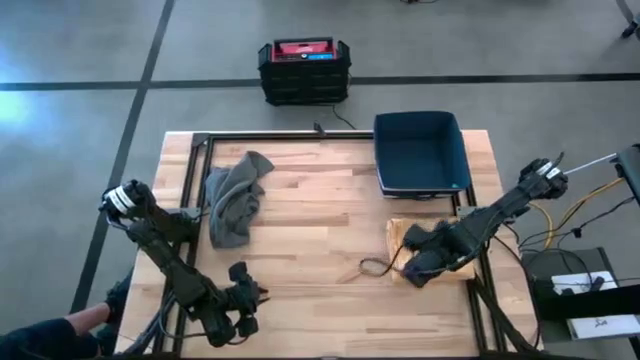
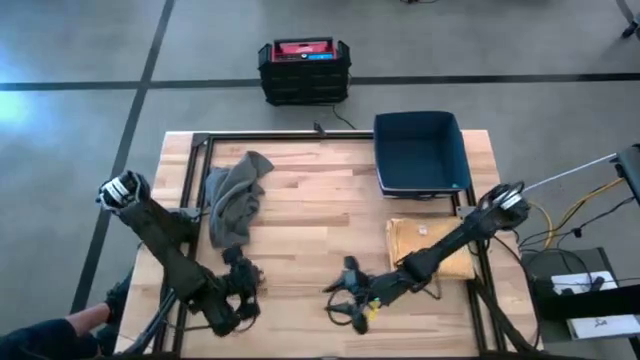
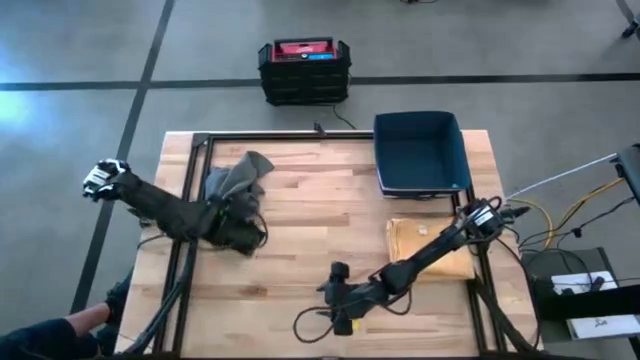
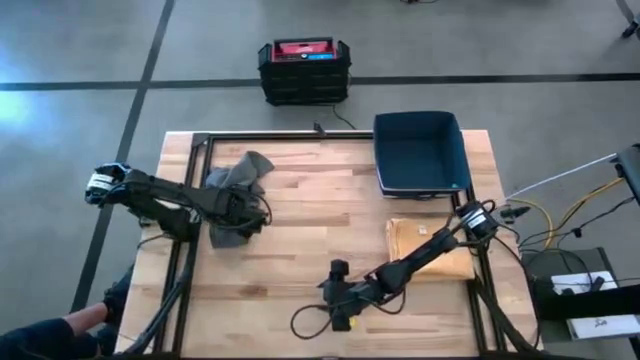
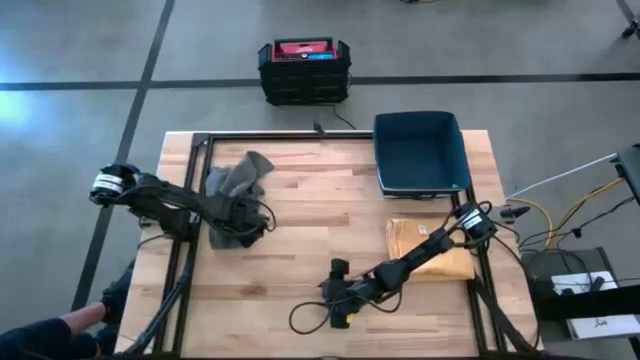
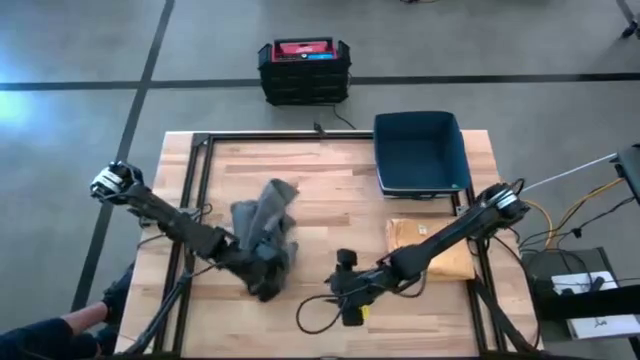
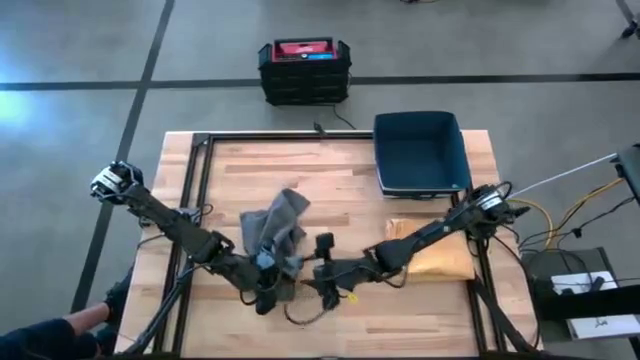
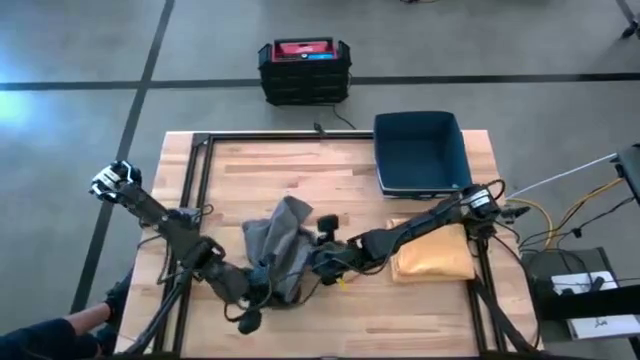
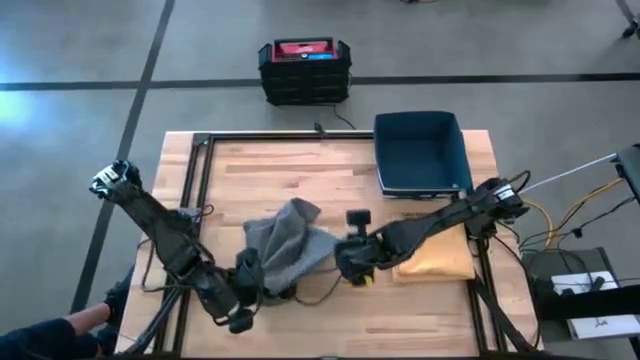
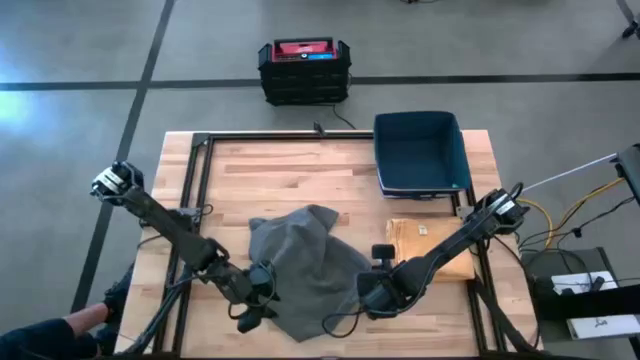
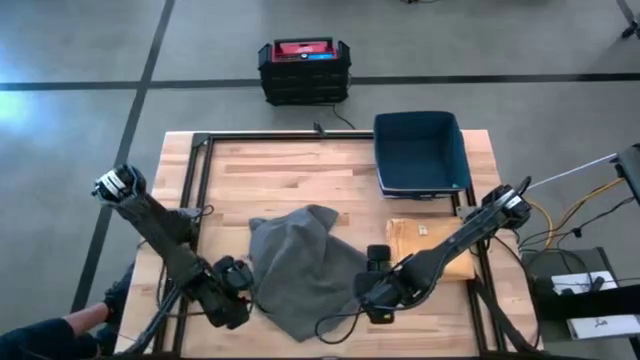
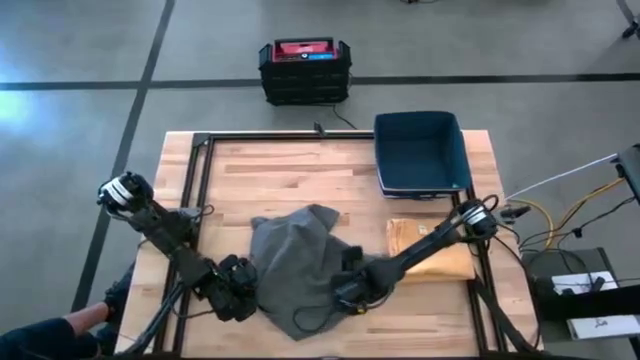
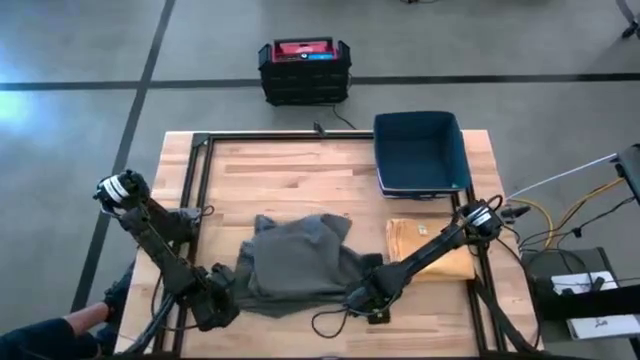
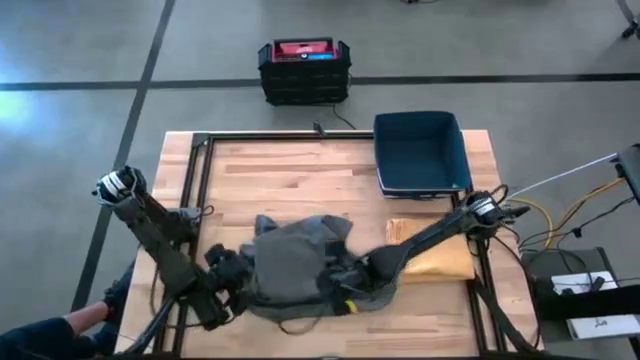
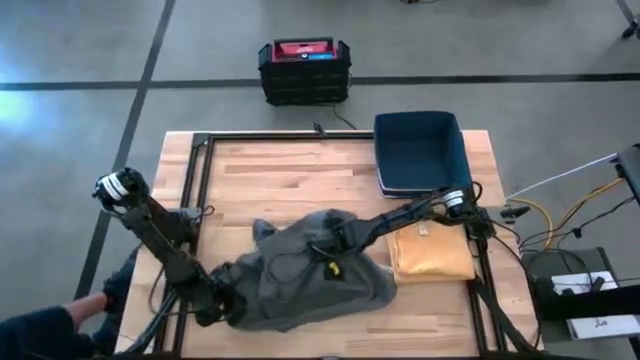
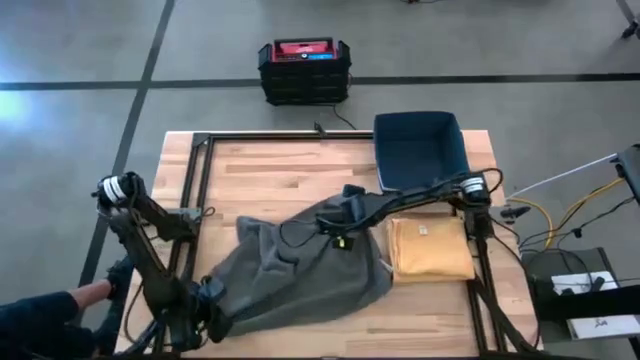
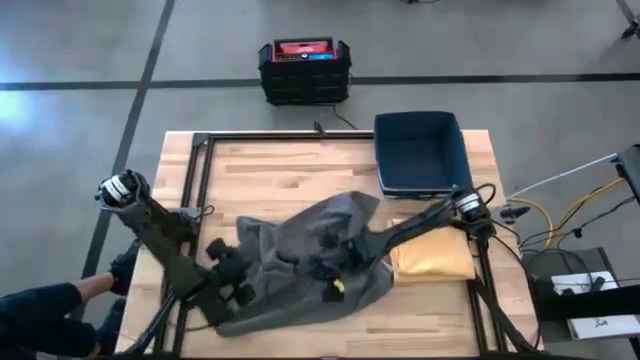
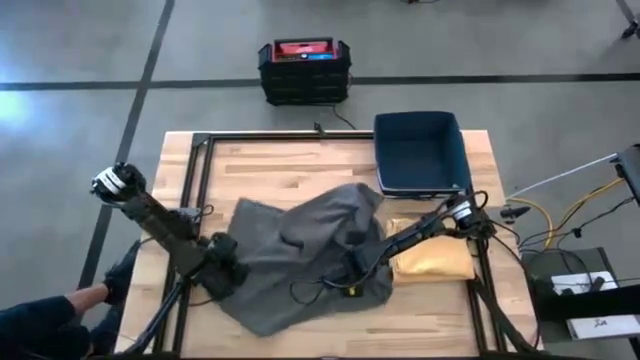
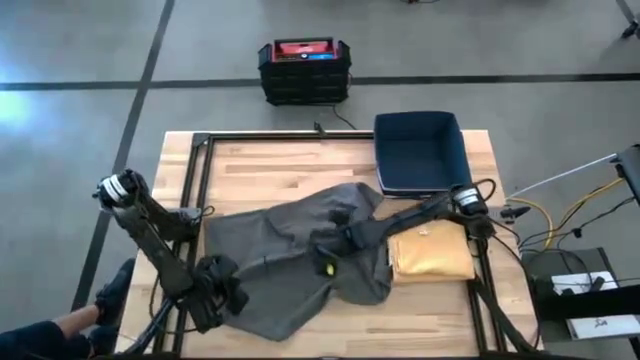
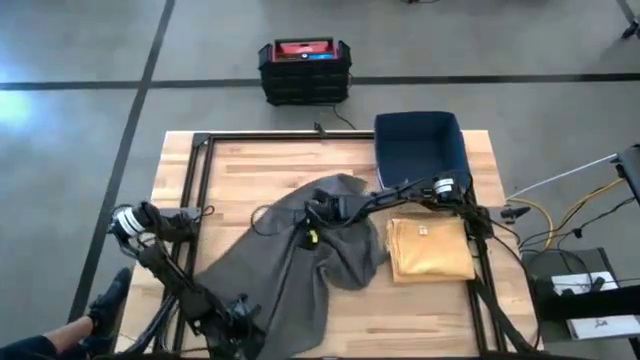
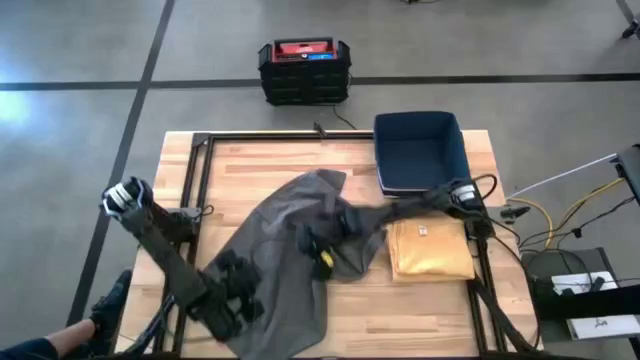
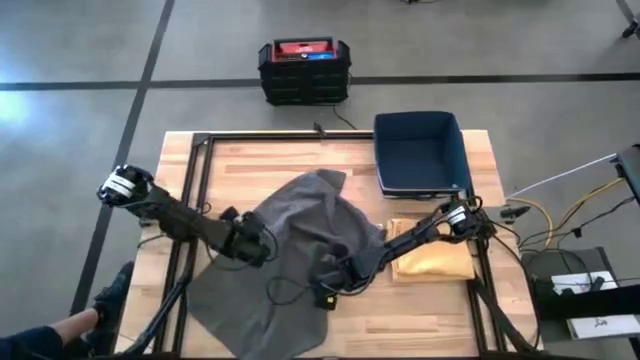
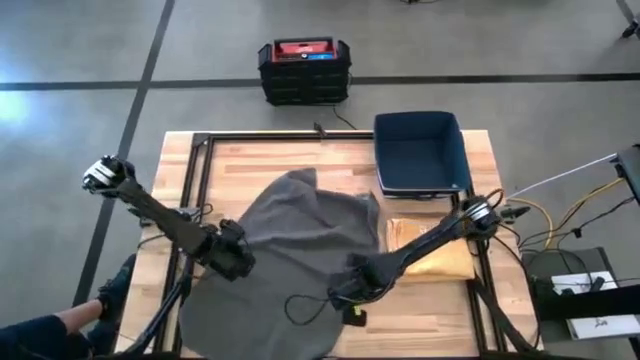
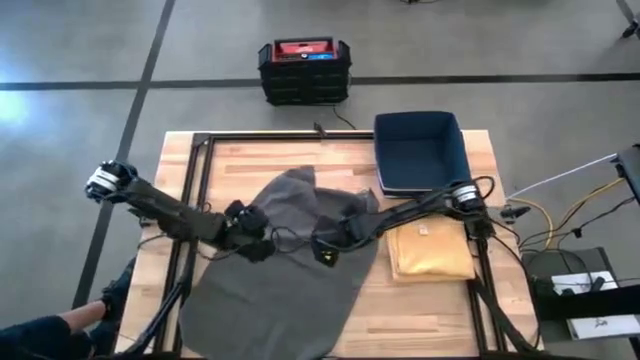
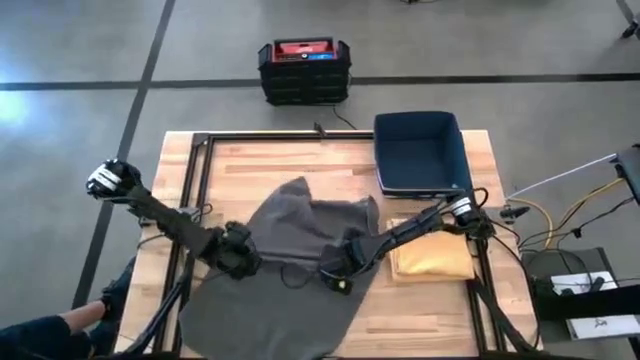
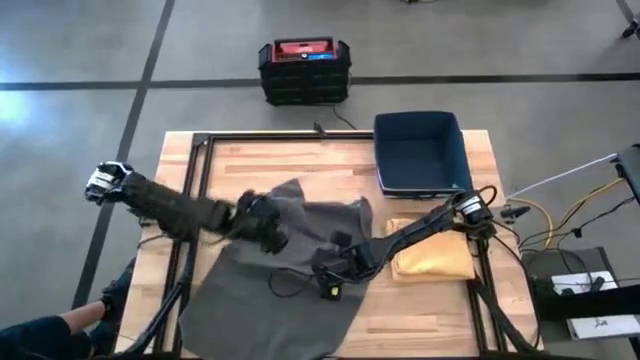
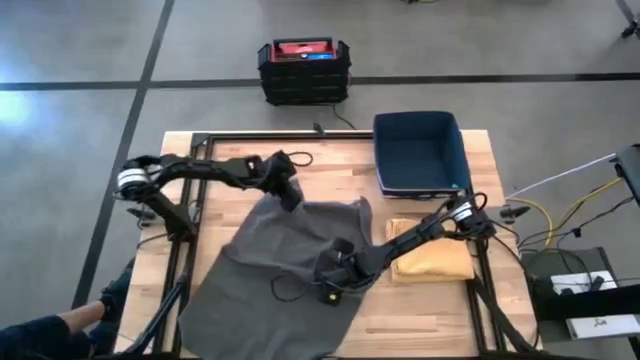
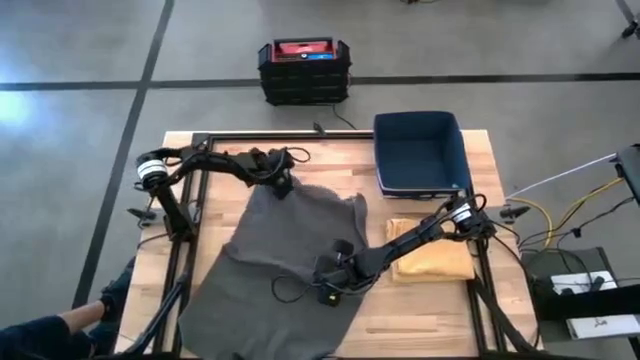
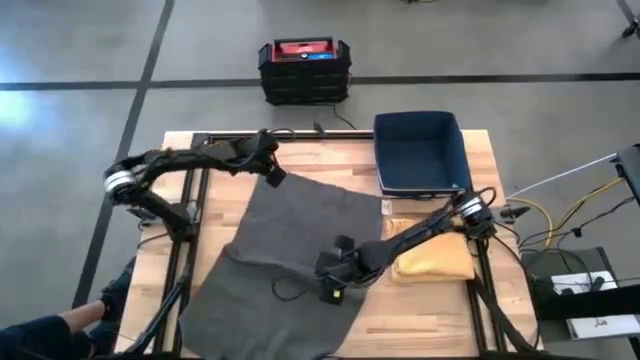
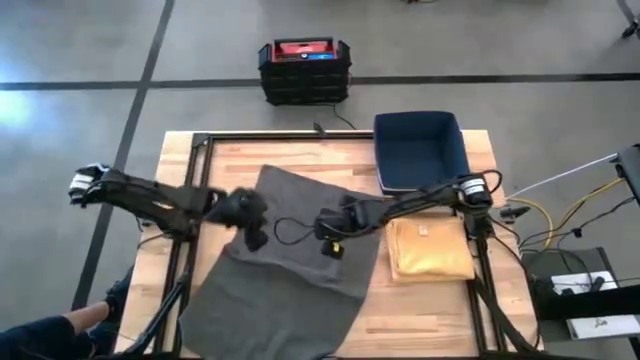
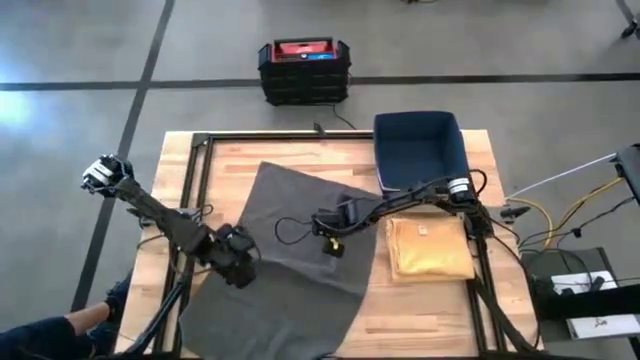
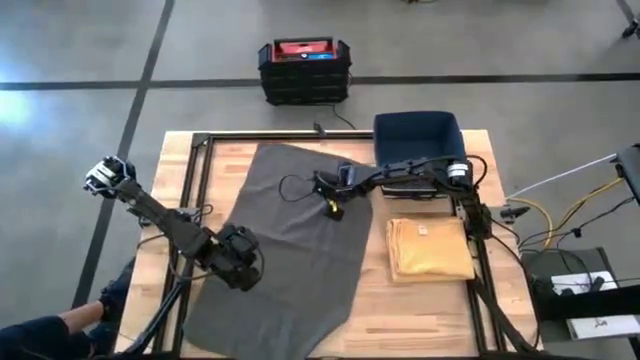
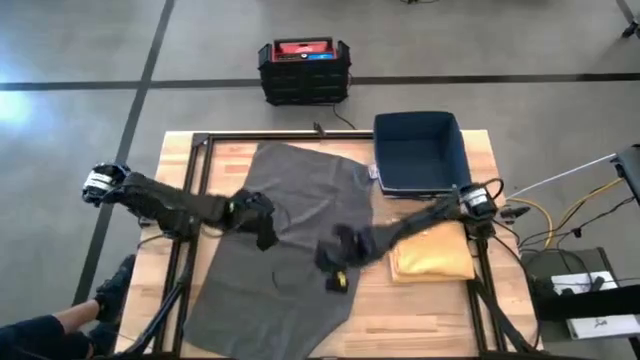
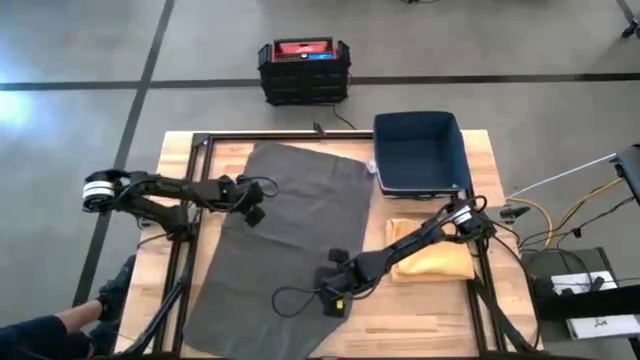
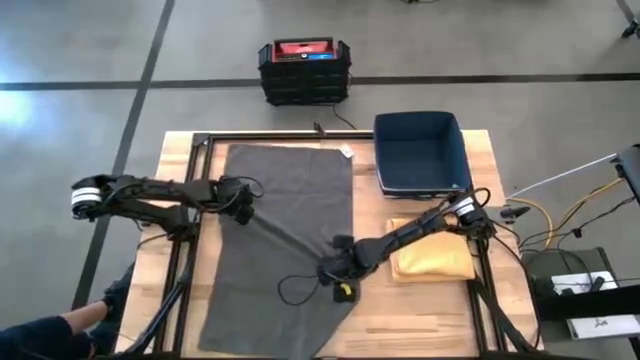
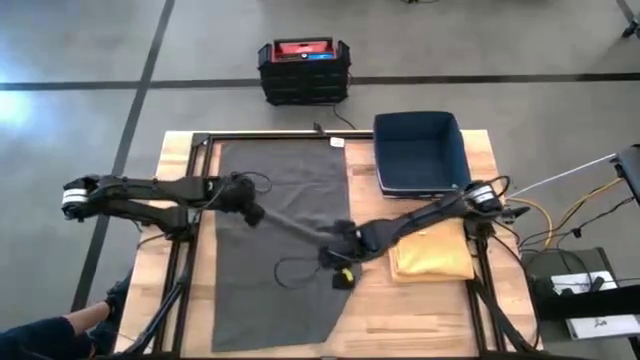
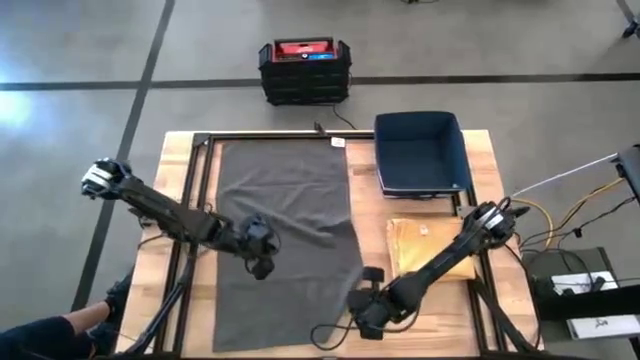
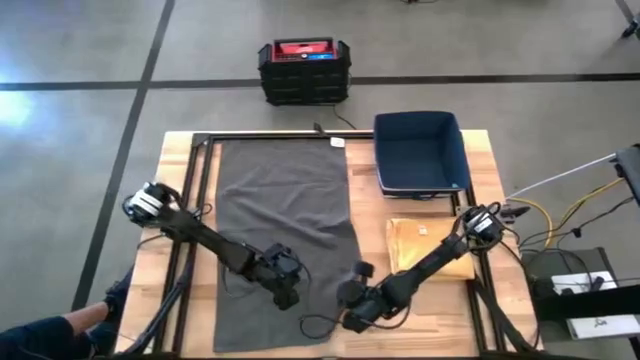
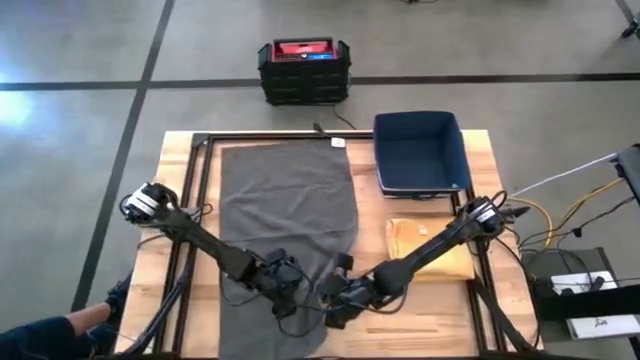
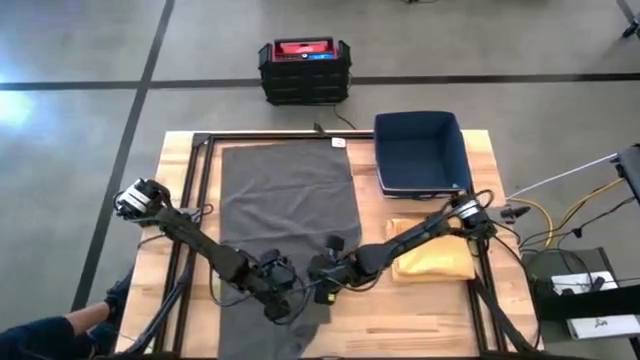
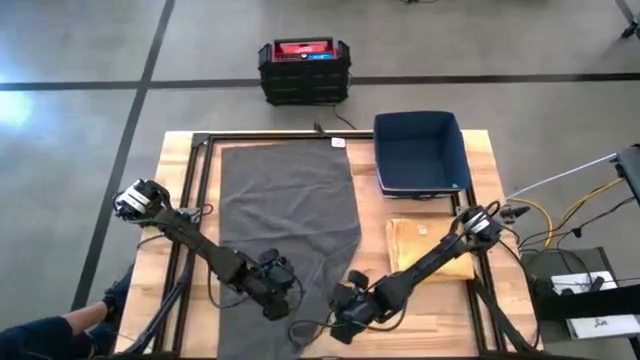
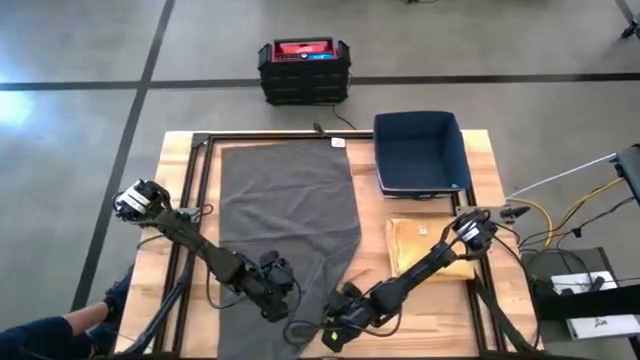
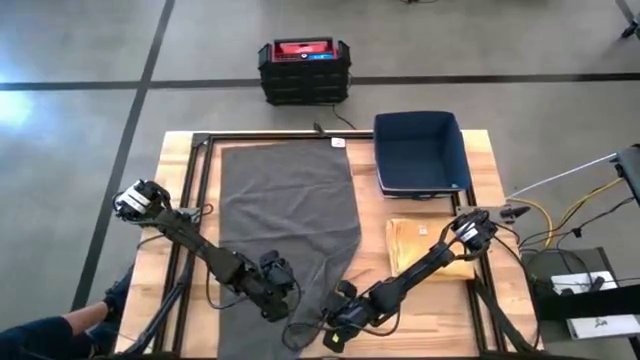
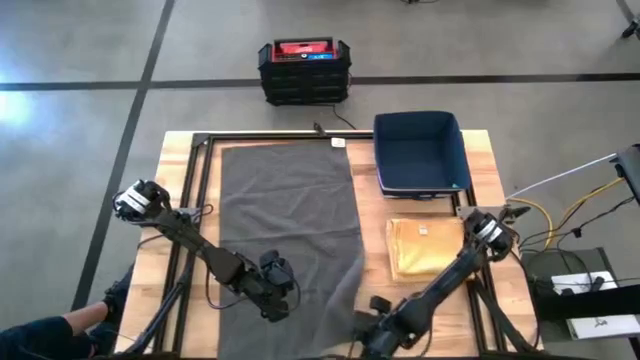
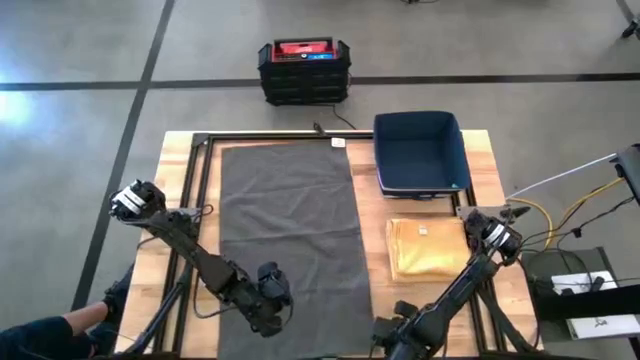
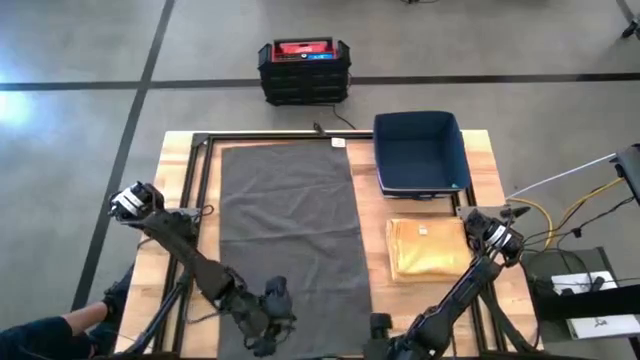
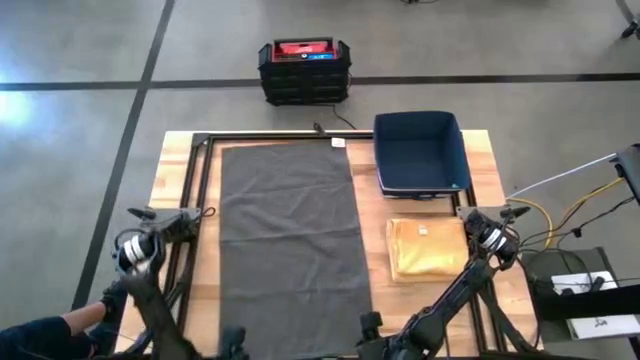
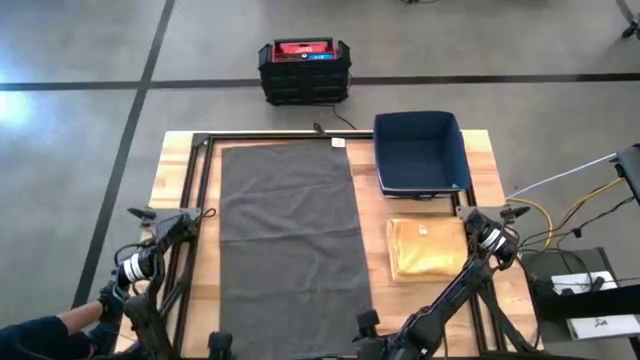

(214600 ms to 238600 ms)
Task: Fold towel
Fold the gray towel
